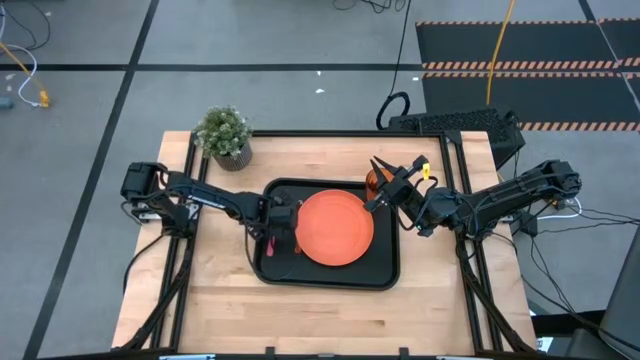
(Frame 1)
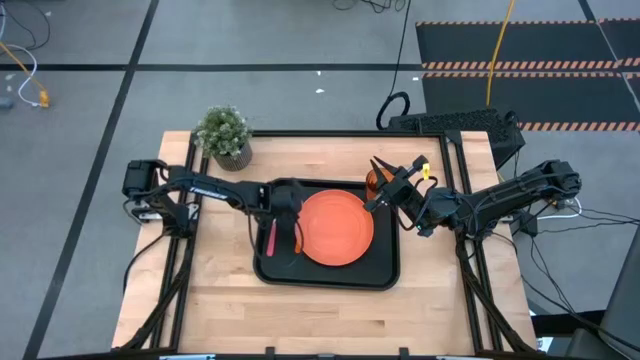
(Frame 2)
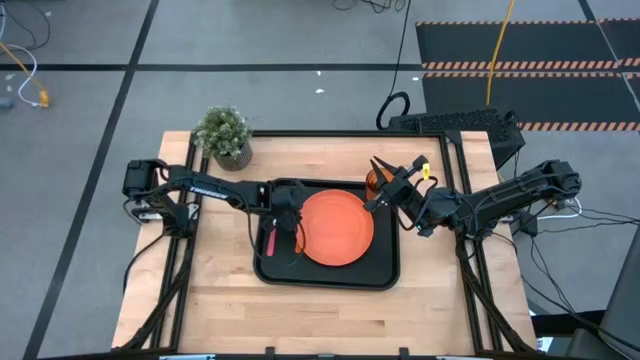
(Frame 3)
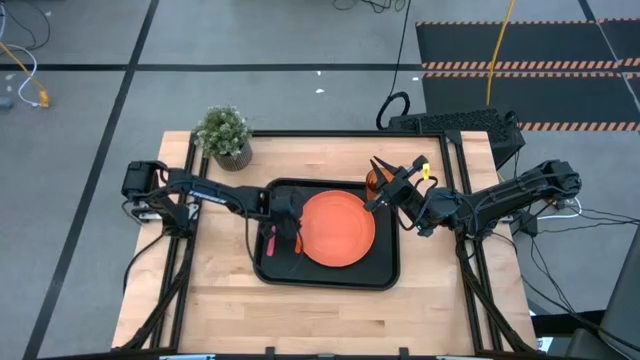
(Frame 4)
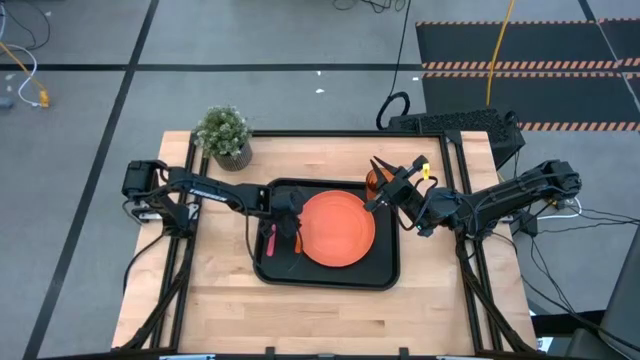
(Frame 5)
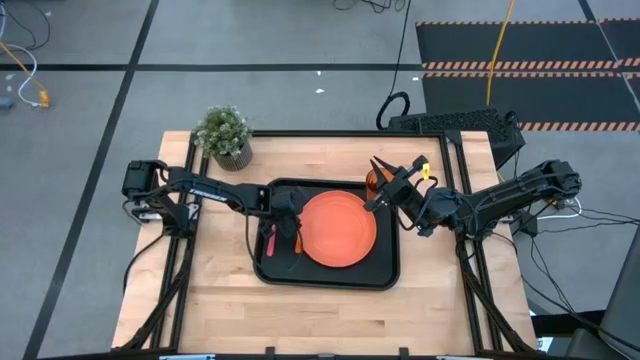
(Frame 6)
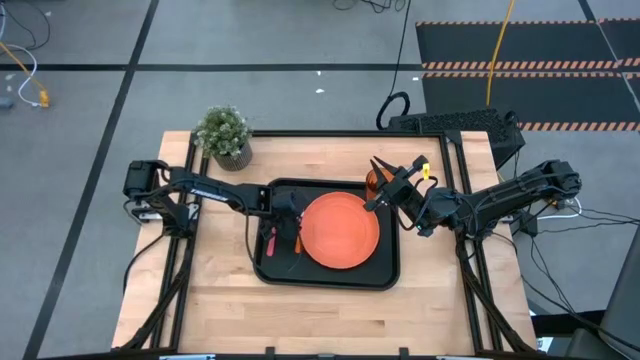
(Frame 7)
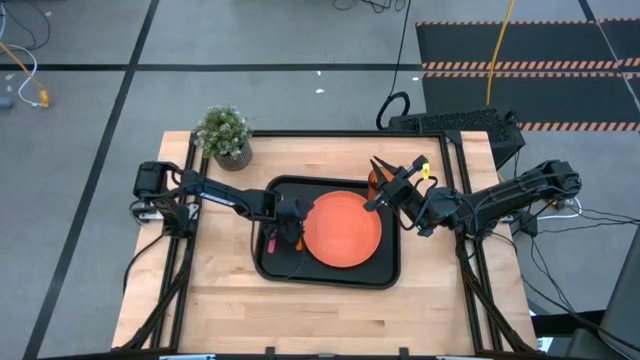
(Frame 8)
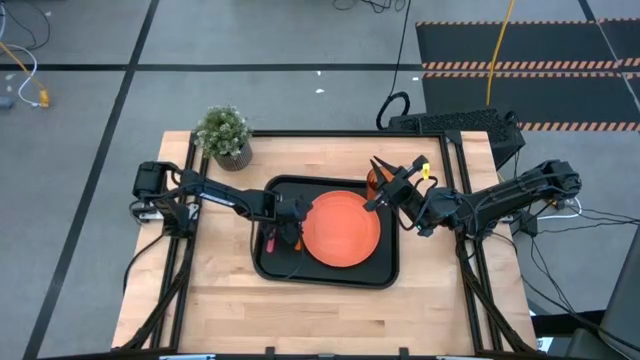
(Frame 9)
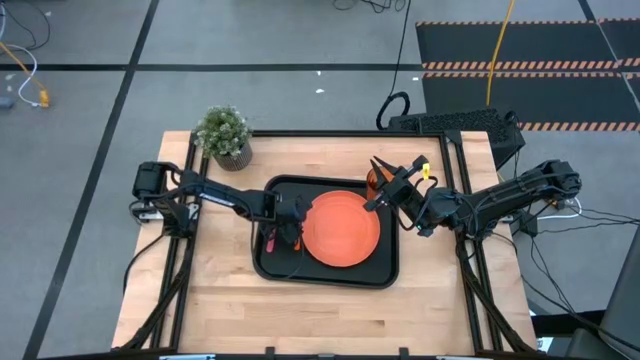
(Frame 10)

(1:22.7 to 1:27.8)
Task: Pick and place plate/cup/fork/spoon on tray
Adjust the orange spoon on the black tray

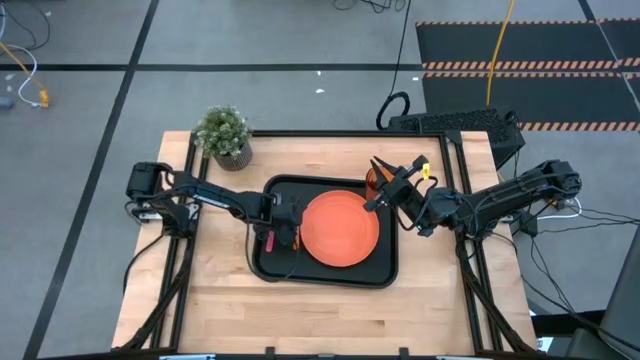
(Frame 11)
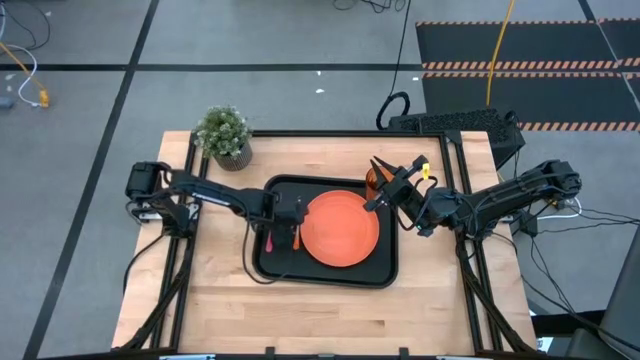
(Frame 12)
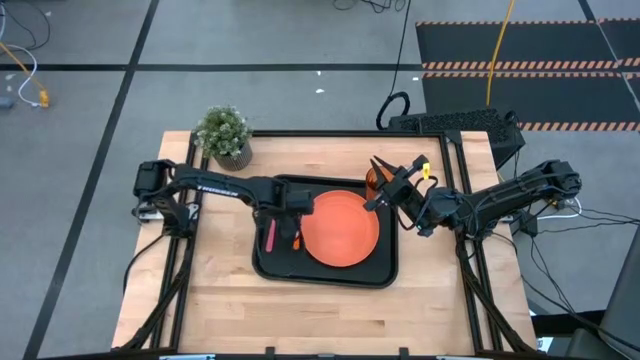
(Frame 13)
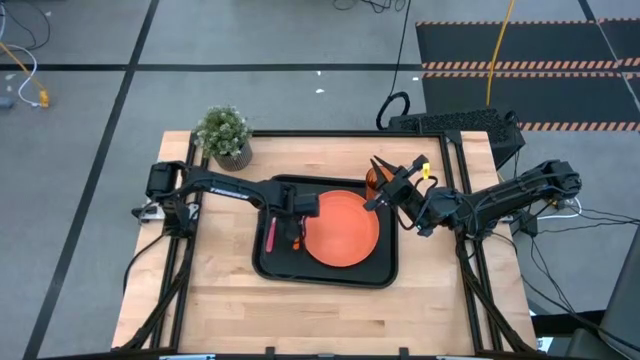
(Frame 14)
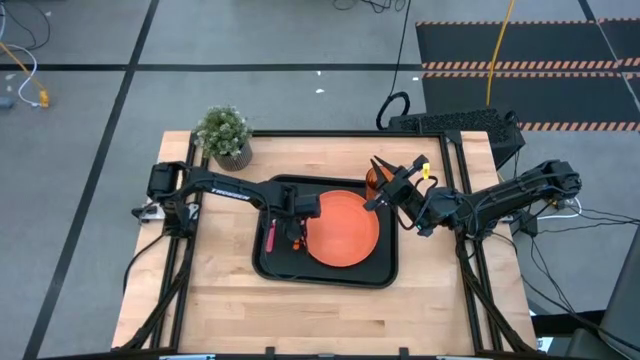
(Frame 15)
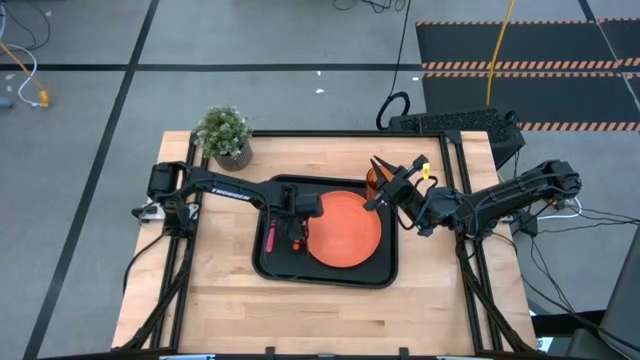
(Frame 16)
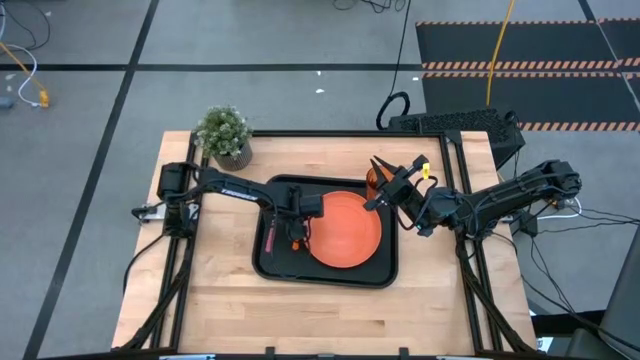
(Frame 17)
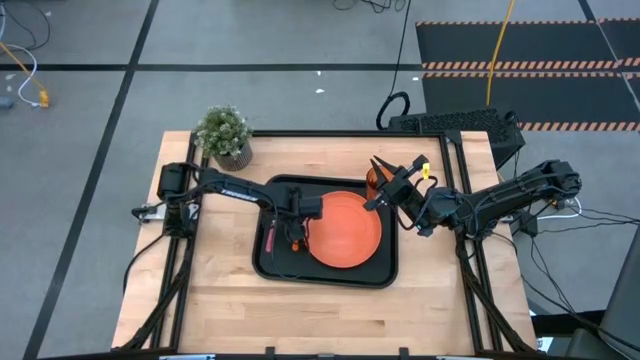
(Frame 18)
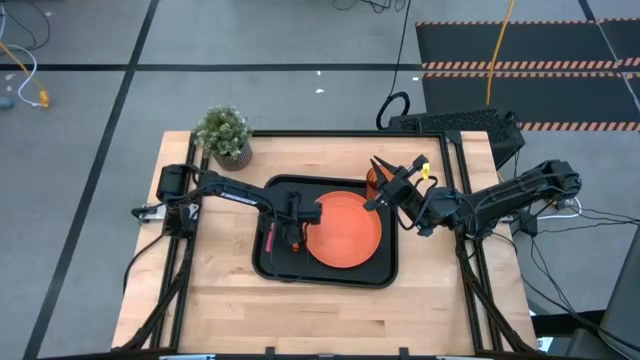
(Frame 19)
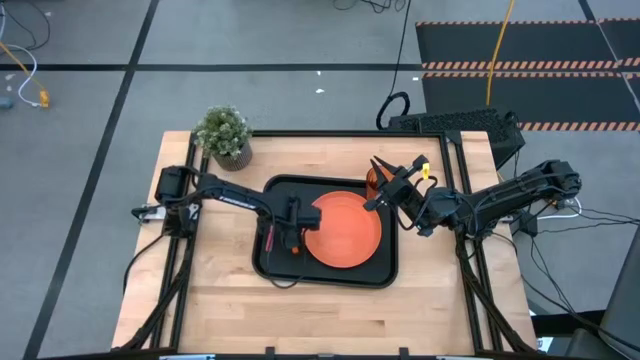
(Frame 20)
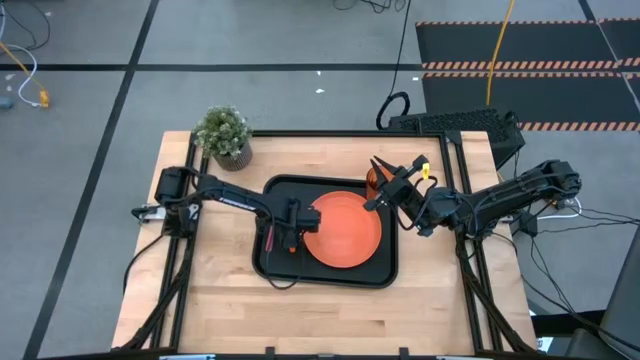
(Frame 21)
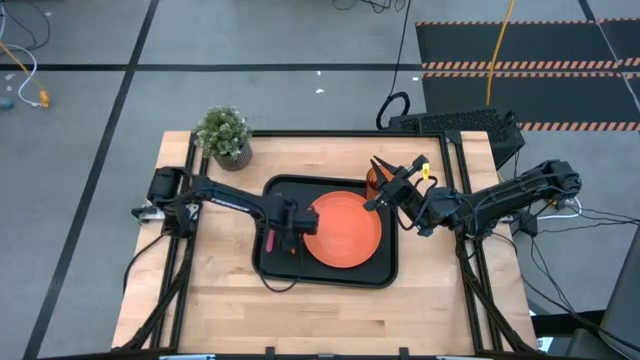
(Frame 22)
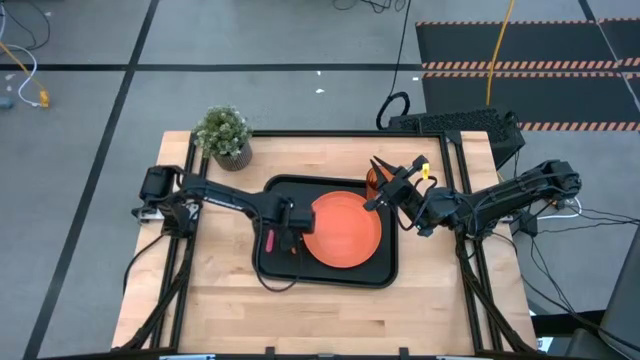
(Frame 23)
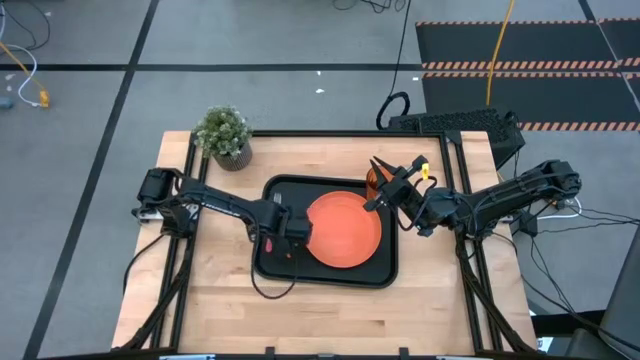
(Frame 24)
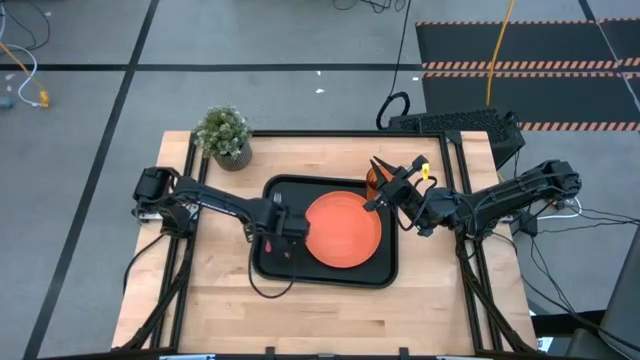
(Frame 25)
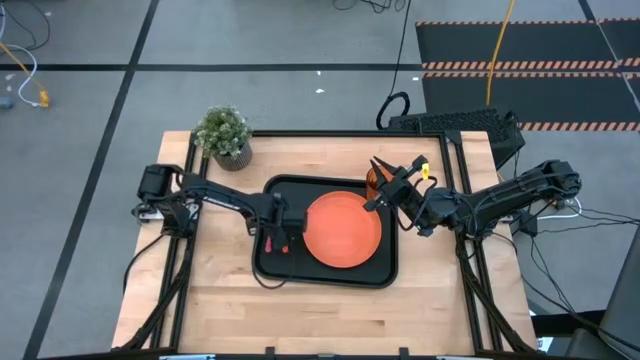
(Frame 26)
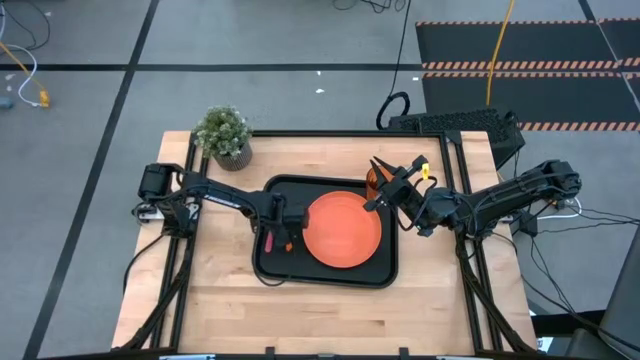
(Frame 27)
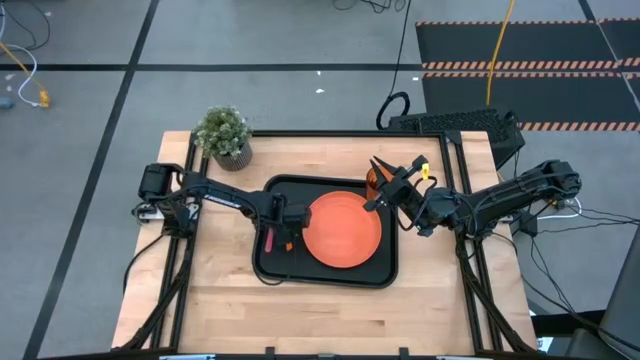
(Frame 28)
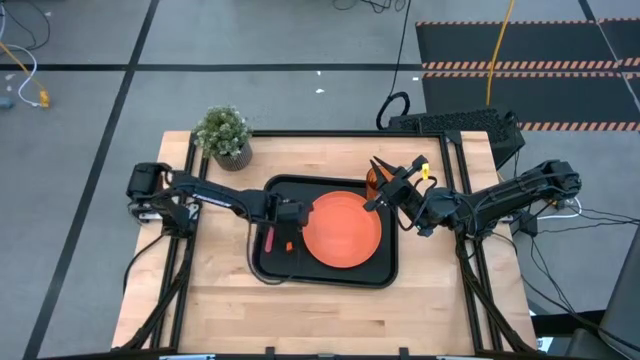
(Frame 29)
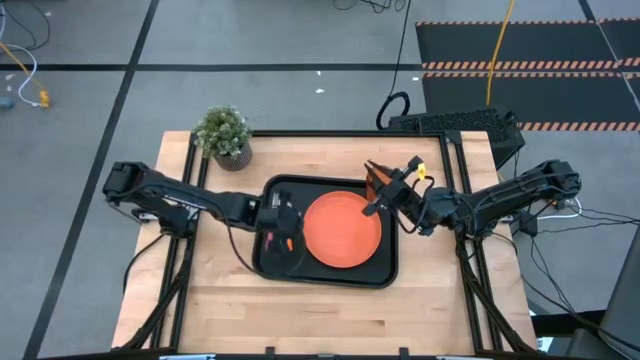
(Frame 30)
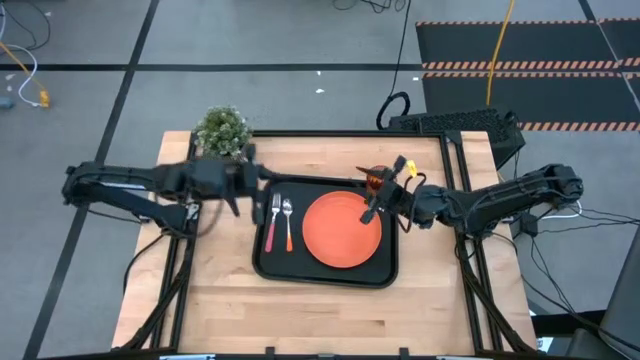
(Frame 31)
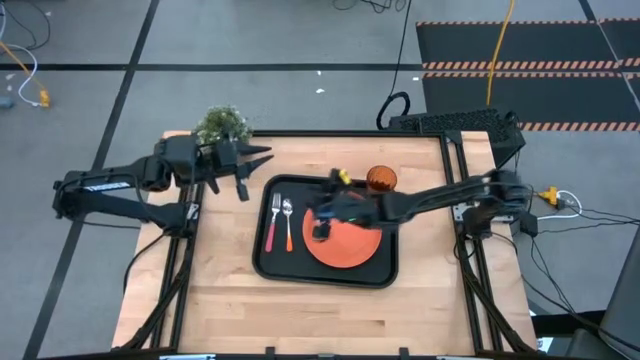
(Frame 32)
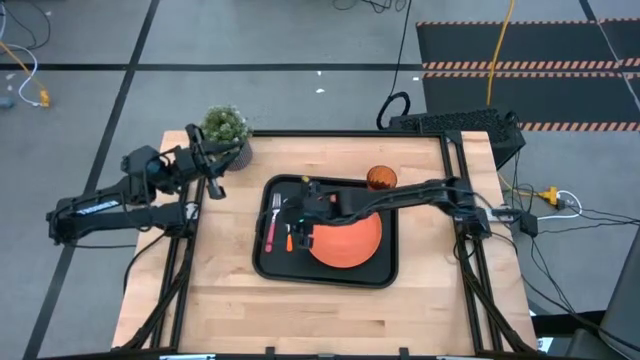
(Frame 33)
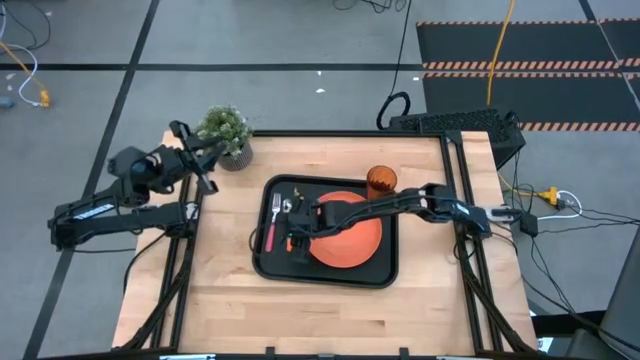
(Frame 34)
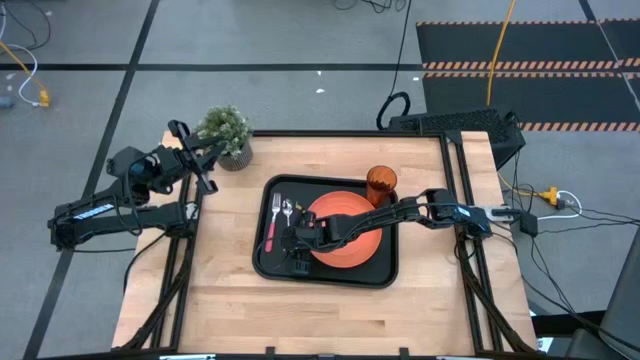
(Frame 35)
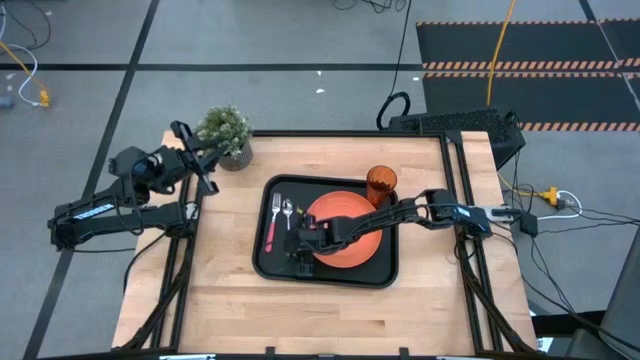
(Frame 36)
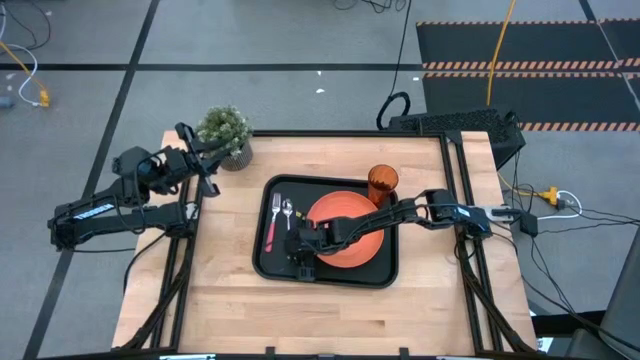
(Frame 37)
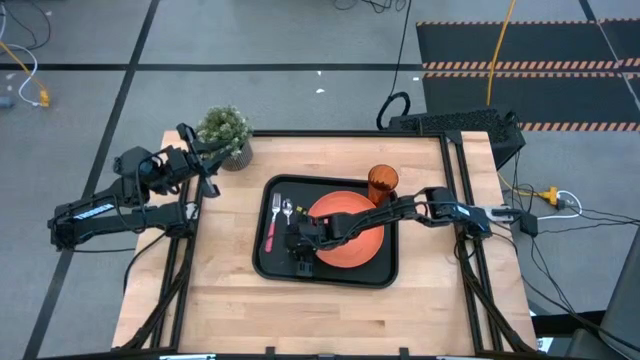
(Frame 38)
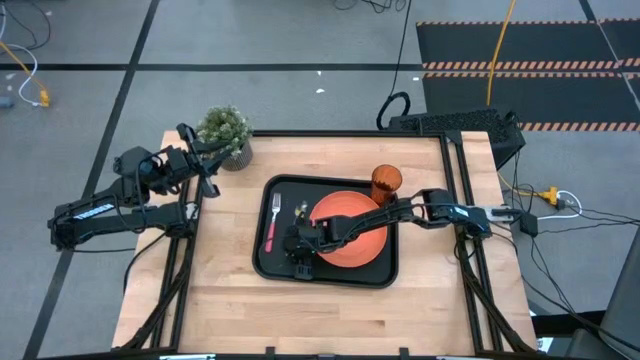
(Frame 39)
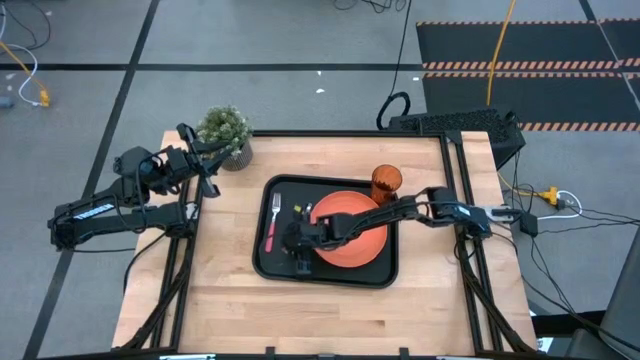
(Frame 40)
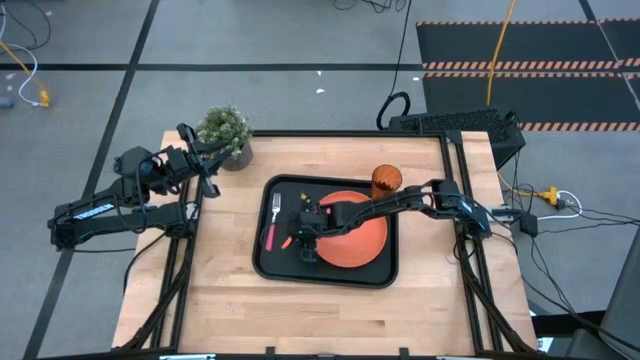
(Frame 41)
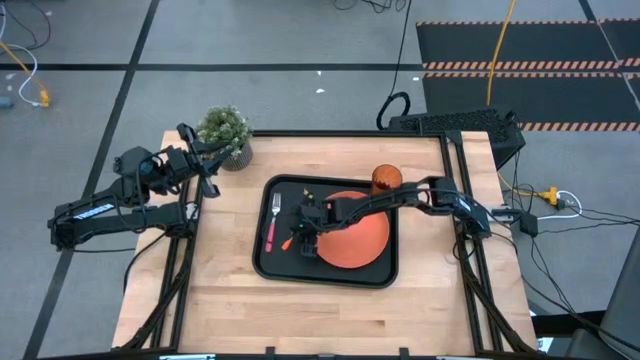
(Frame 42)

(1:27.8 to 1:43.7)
Adjust the orange spoon on the black tray
